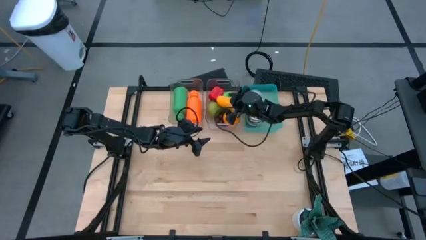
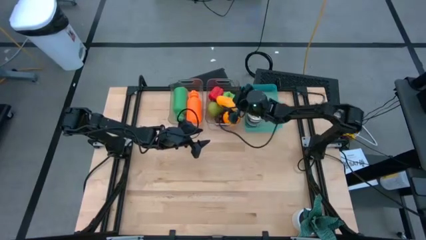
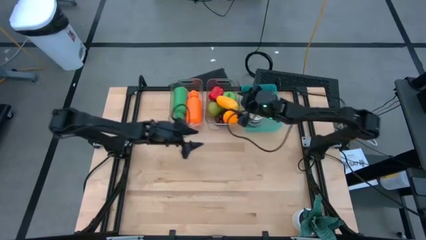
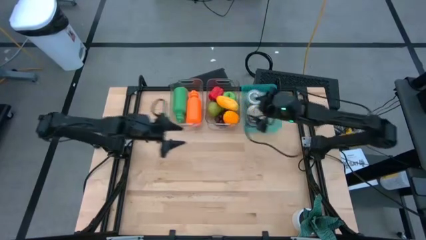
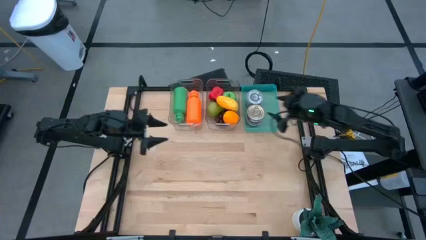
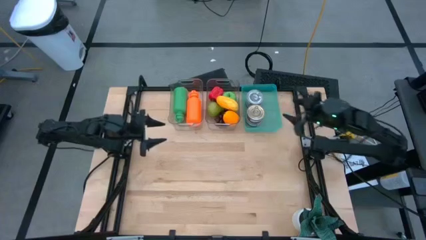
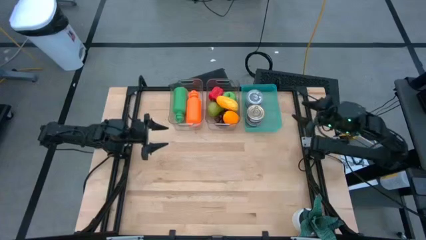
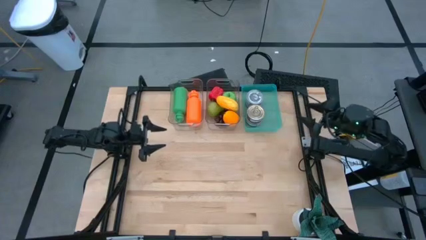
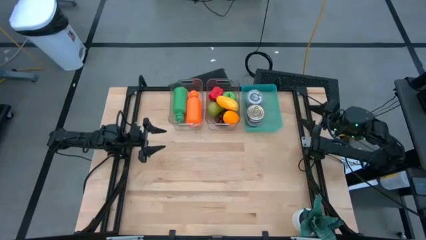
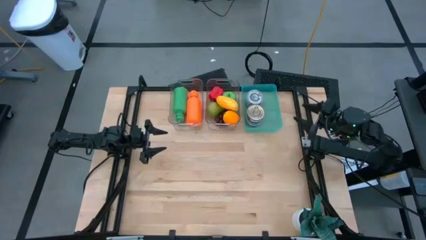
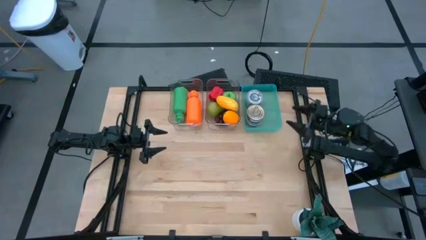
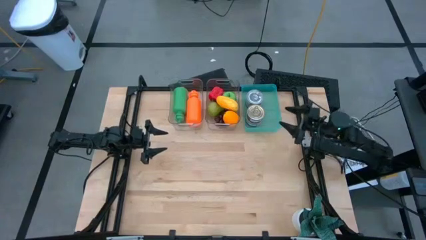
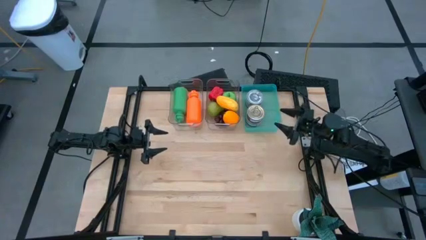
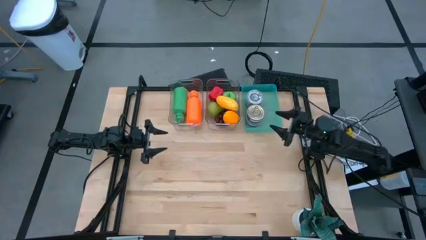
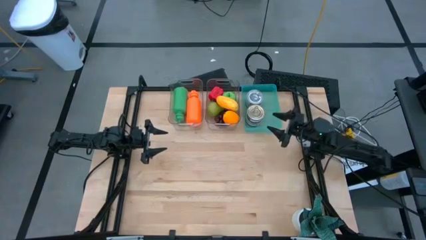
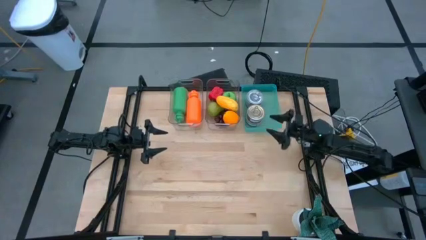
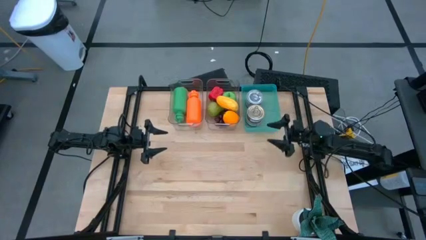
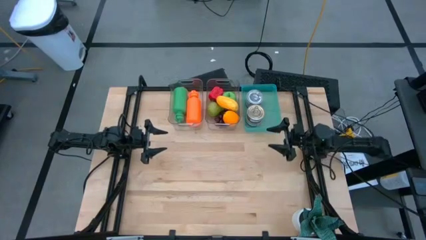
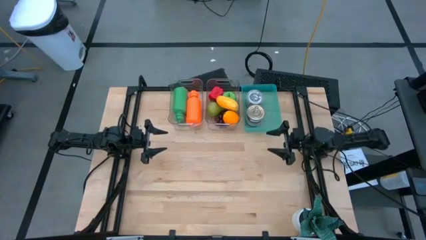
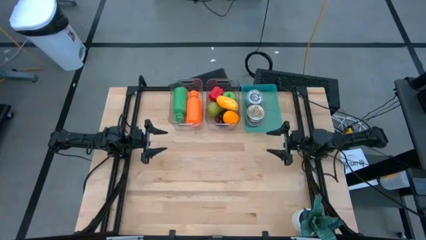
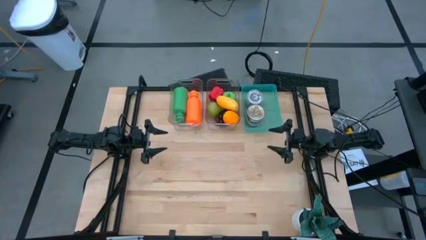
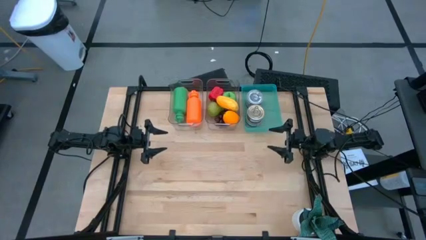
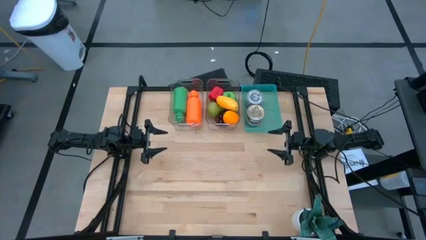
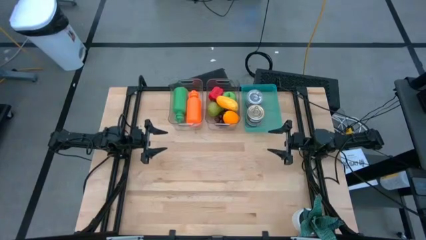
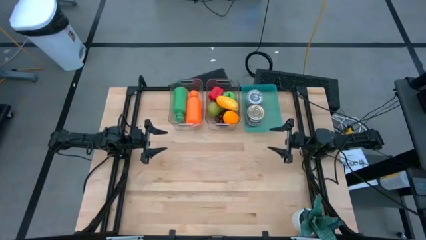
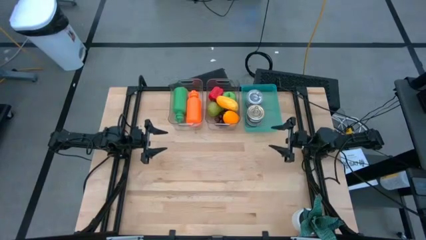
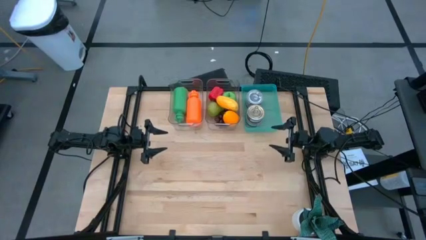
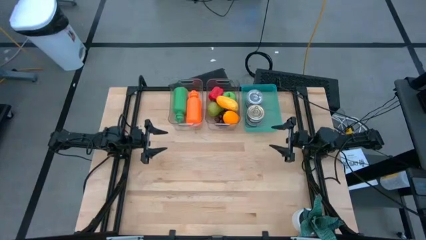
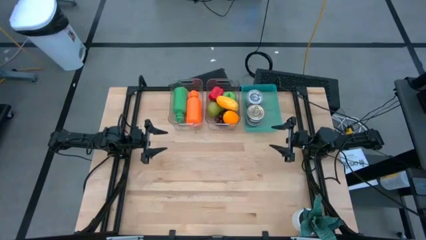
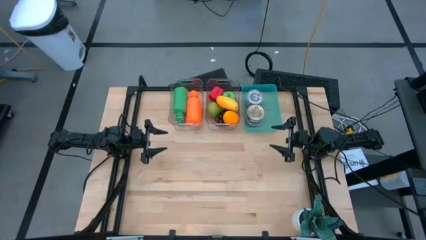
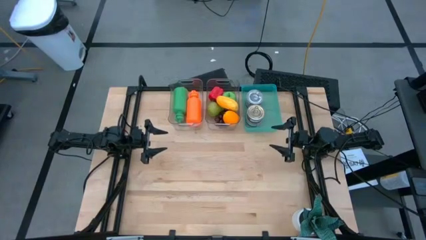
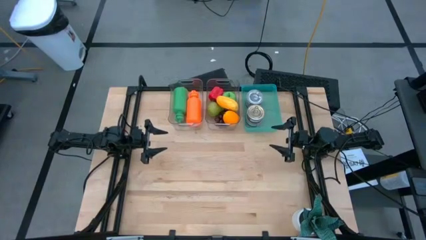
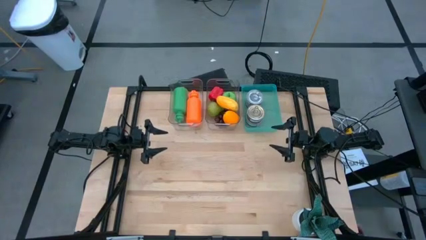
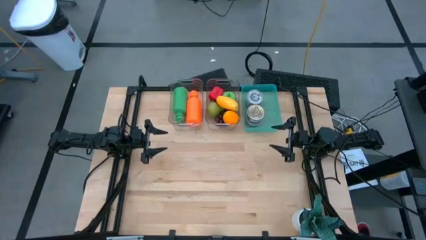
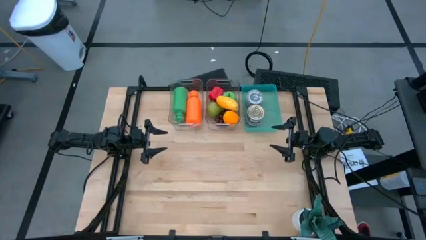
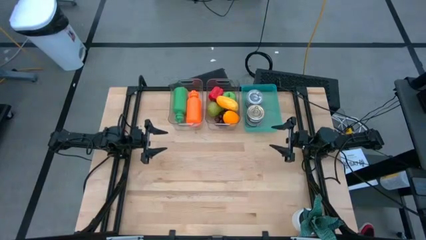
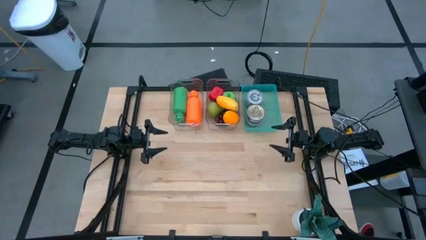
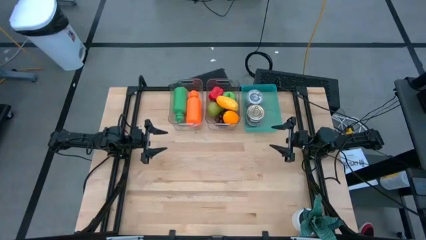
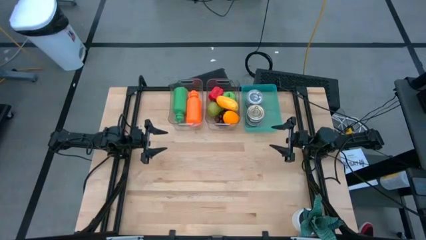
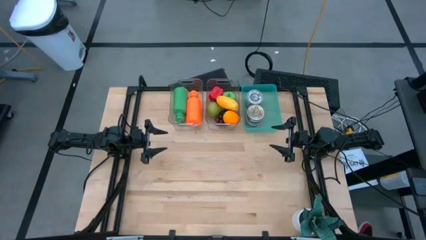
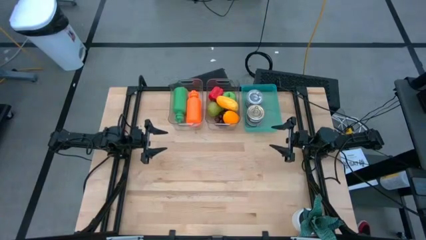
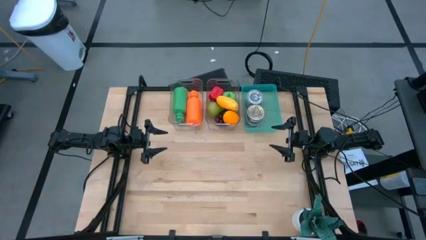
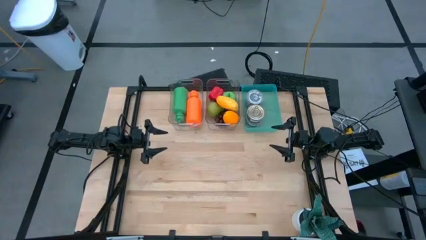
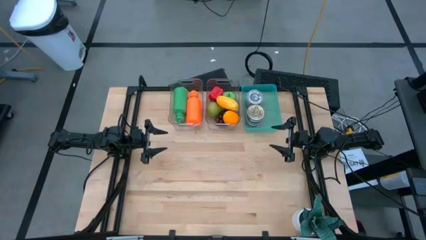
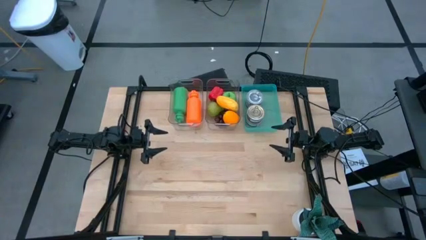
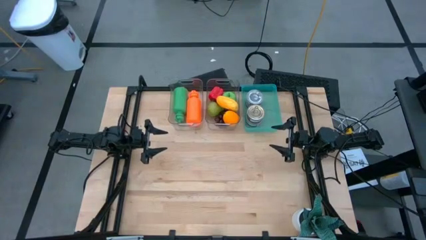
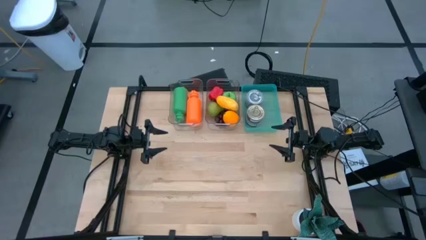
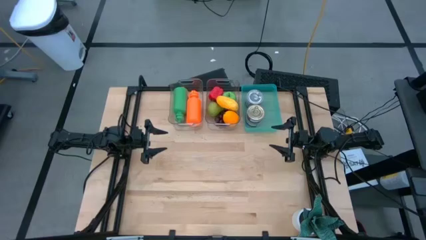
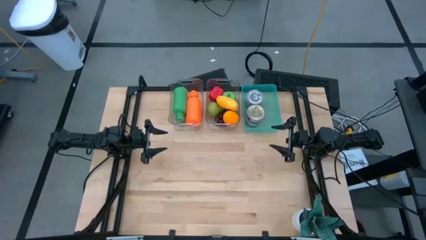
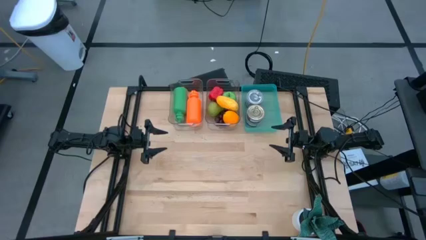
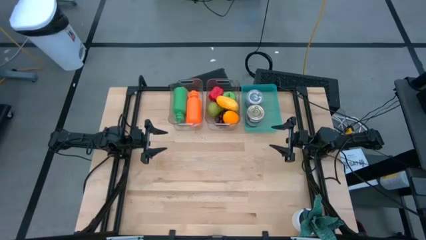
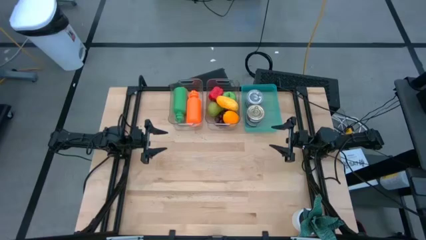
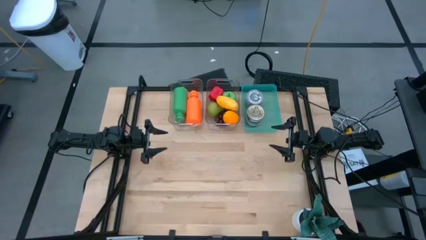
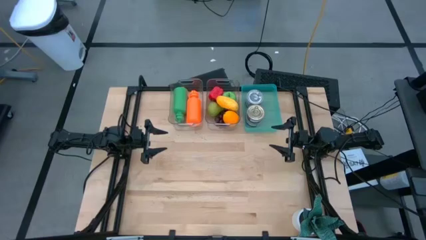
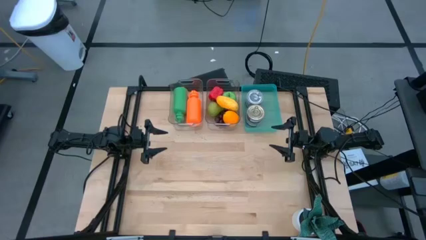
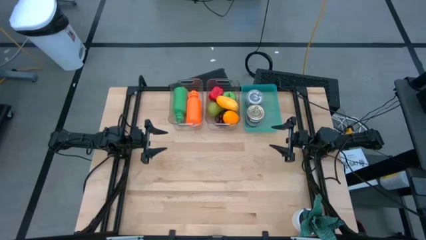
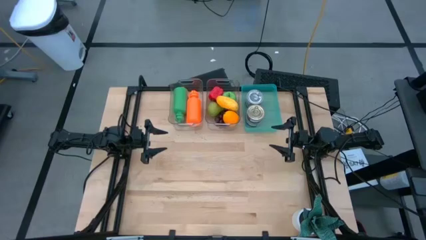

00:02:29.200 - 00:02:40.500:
Task: Pick & Place Food Item
Return to Home Position
